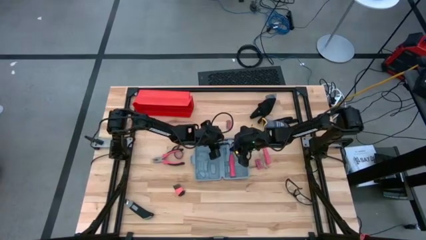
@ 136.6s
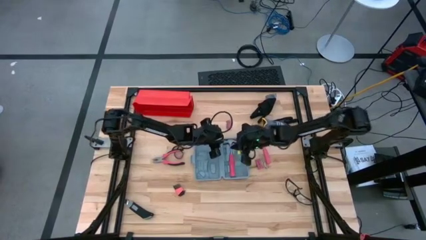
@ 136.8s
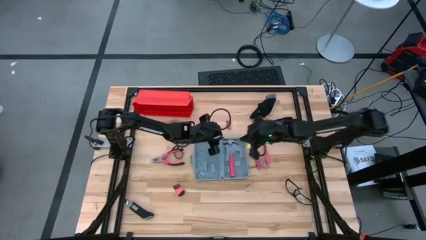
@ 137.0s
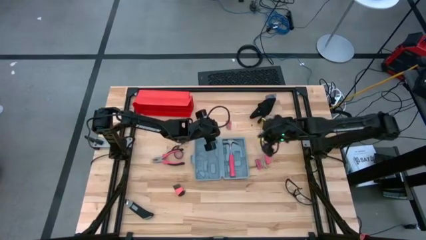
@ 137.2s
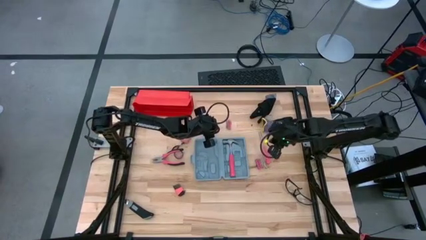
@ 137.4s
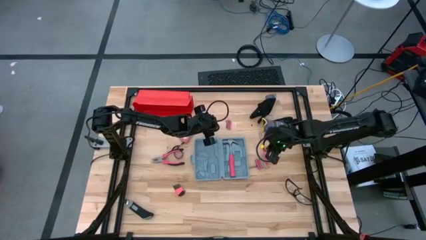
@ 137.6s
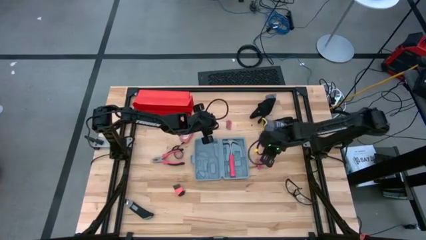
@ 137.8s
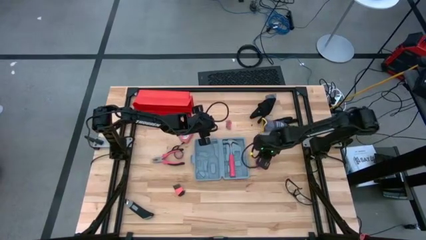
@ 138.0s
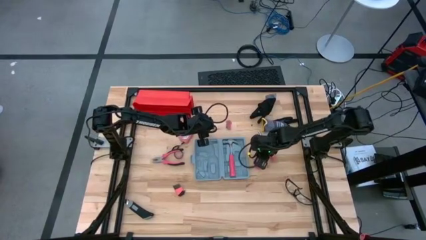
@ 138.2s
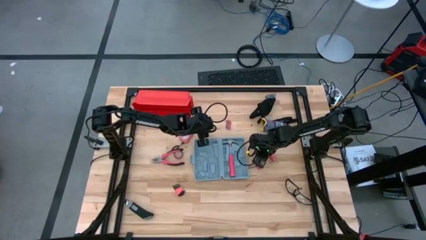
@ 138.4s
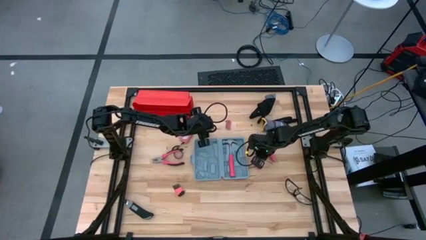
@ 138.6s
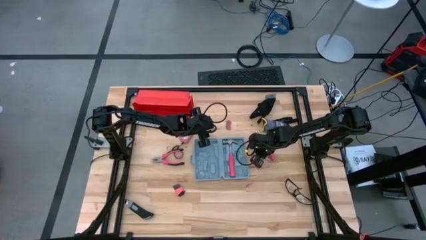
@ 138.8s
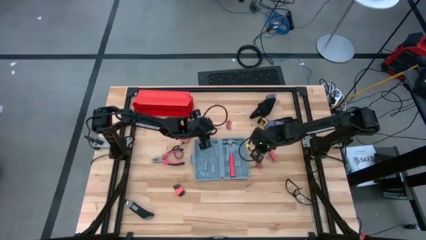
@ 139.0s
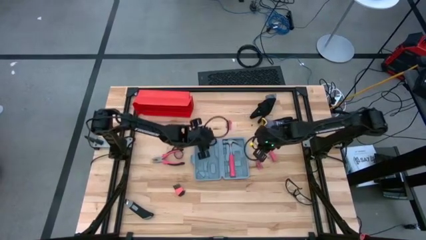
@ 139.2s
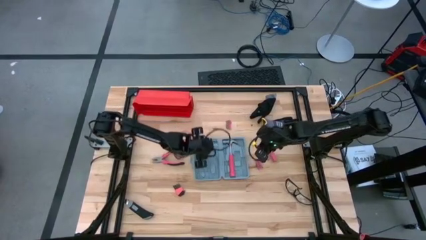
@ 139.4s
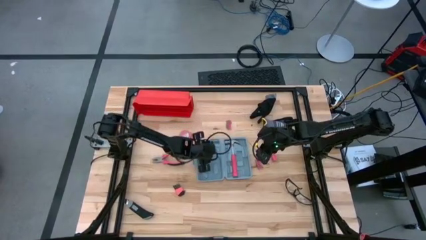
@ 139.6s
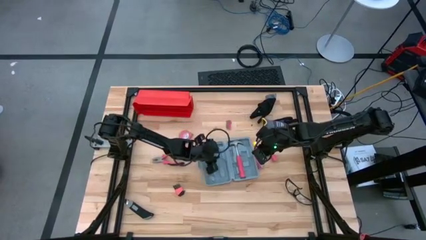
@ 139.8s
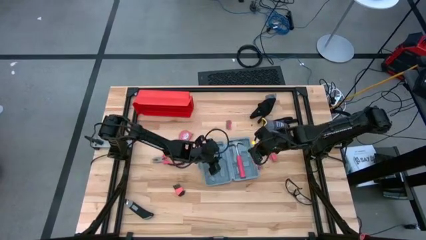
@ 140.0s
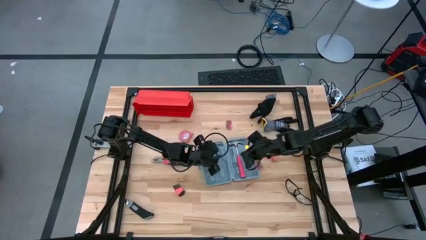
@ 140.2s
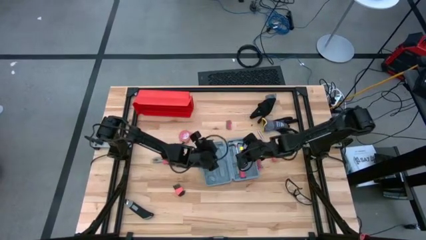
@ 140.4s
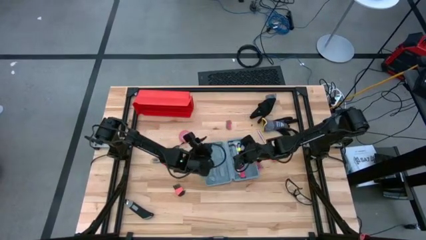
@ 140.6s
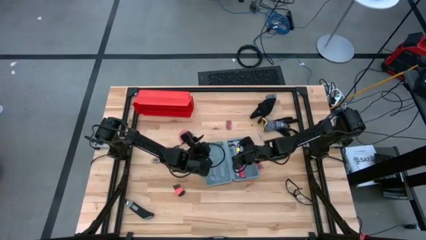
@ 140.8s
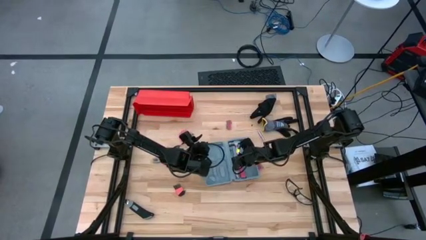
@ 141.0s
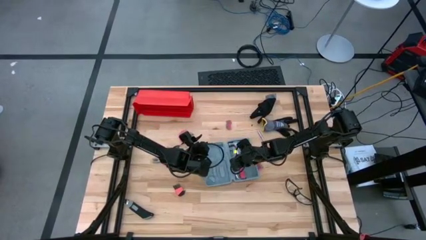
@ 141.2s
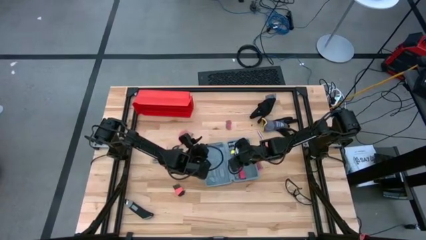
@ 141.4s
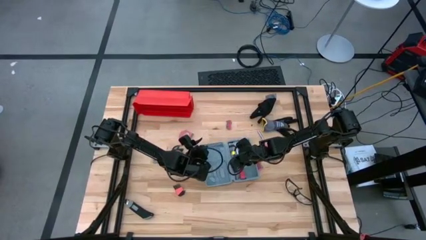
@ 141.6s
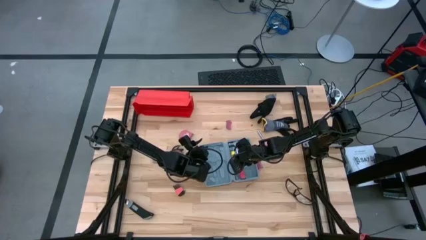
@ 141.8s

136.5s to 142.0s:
Task: prefit tool cases
Put the transparent flat screwdriver into the gray pre-fit tool case

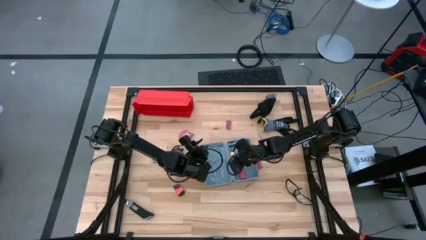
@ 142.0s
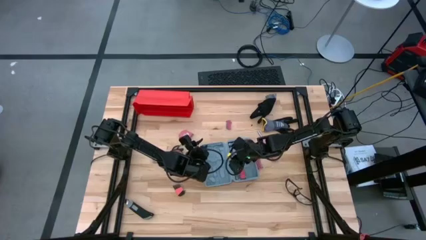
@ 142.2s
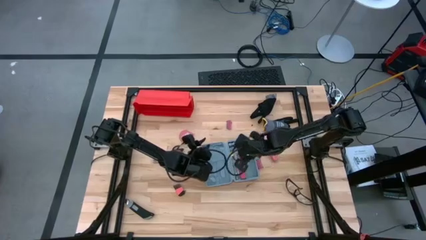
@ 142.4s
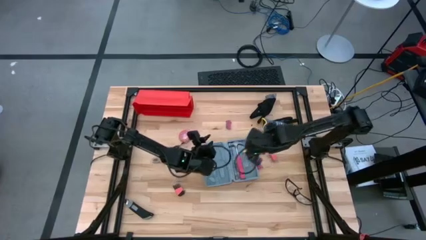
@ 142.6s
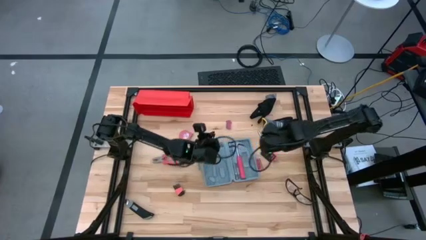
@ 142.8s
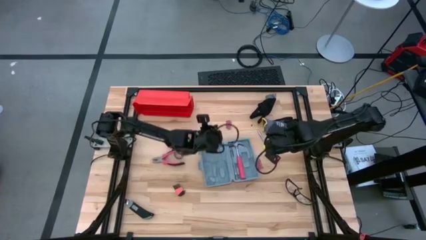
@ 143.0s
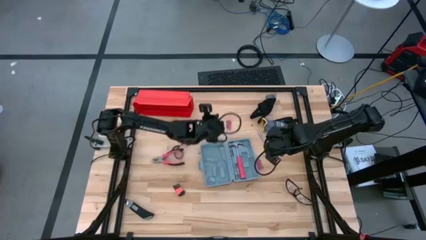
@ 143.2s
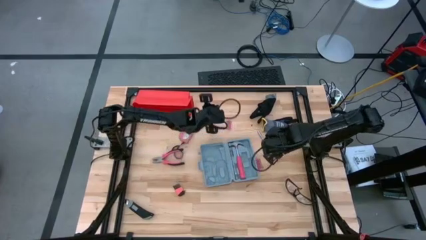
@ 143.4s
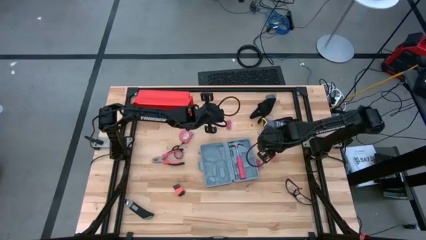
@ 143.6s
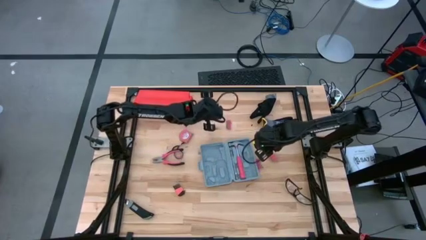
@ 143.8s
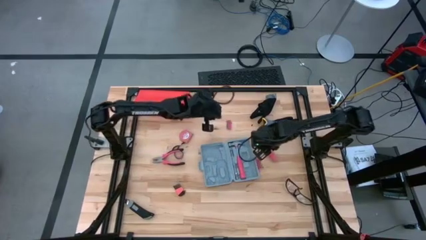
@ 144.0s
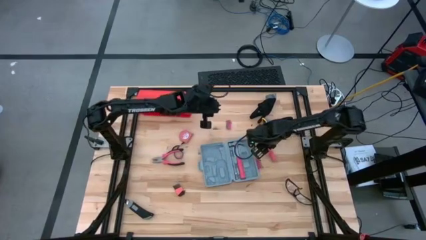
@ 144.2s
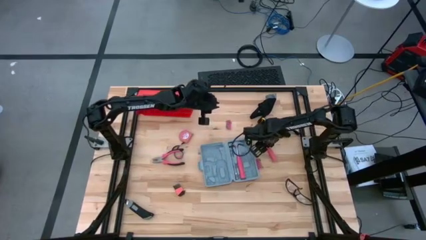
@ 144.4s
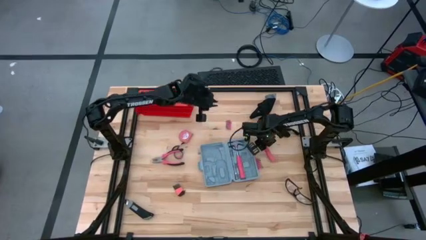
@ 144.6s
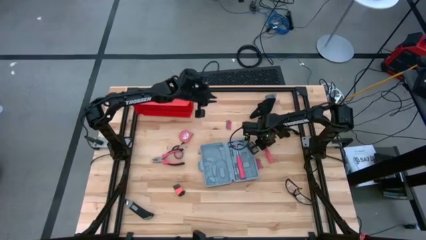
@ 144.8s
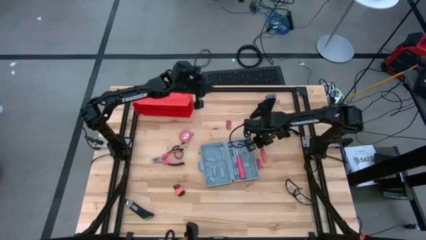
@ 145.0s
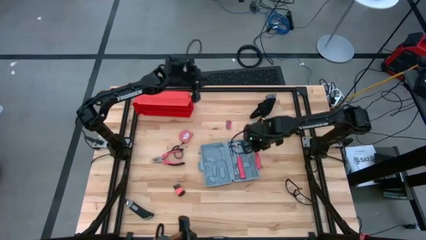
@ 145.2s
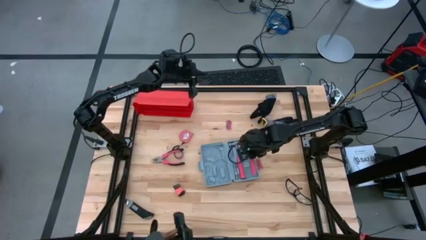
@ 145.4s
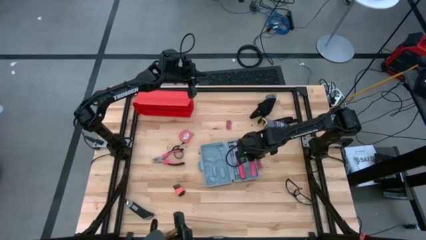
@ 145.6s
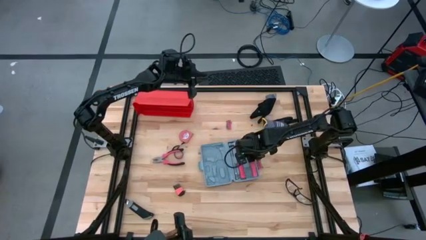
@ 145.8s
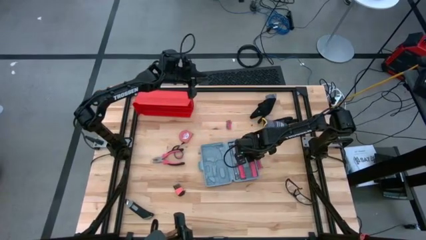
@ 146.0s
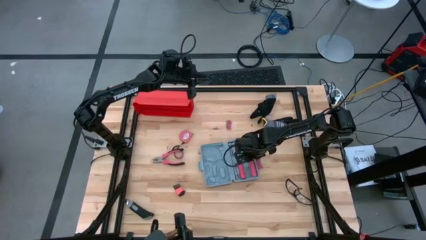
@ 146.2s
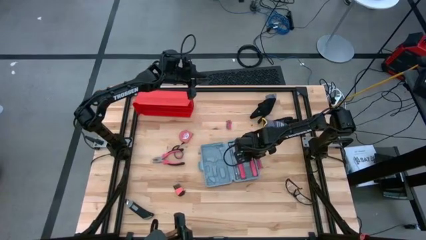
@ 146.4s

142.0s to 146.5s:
Put the orange nut driver into the gray pre-fit tool case

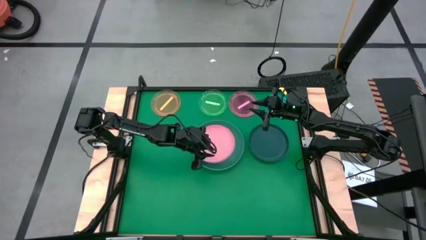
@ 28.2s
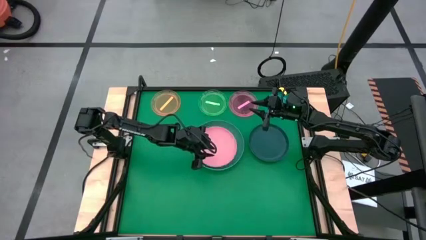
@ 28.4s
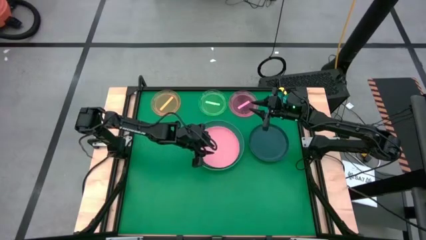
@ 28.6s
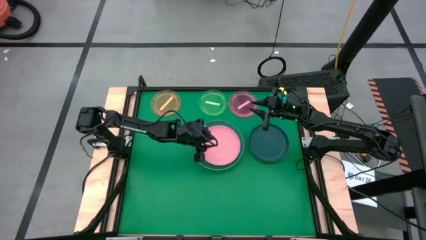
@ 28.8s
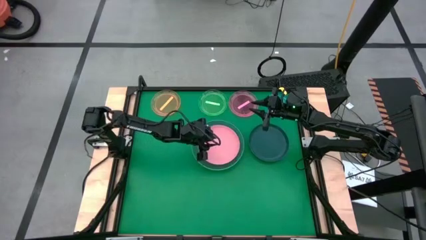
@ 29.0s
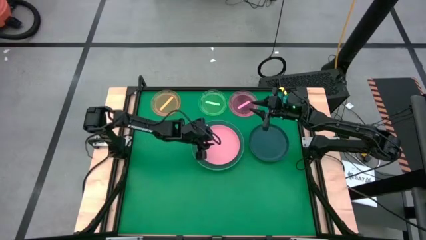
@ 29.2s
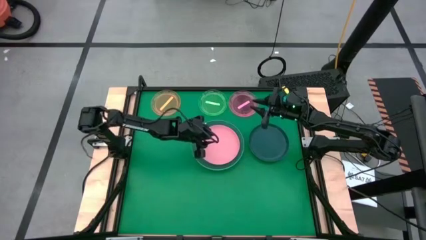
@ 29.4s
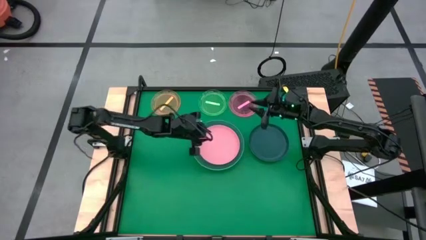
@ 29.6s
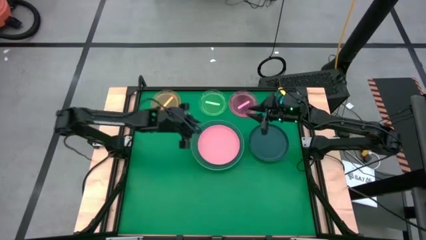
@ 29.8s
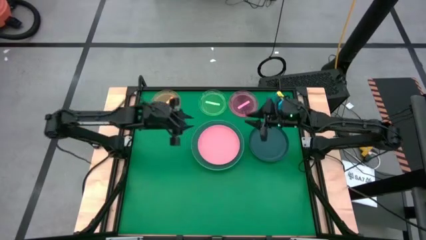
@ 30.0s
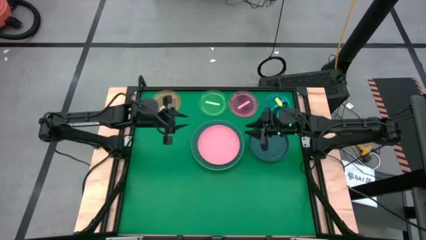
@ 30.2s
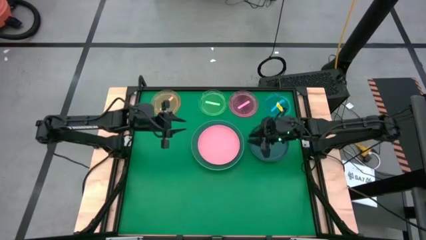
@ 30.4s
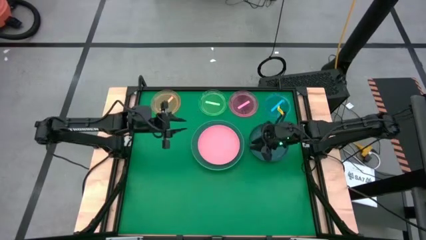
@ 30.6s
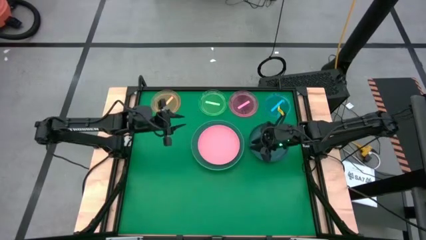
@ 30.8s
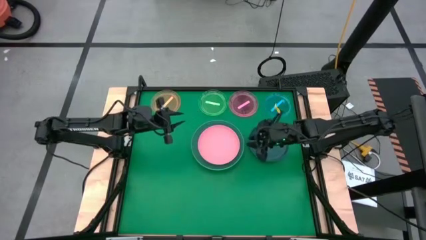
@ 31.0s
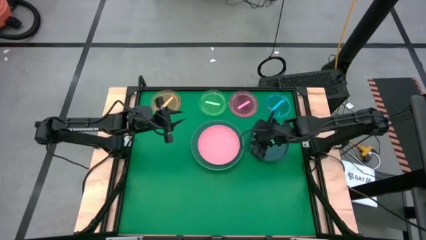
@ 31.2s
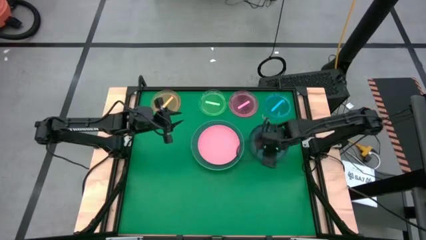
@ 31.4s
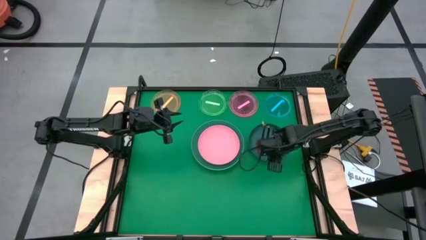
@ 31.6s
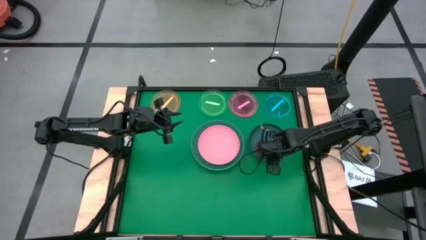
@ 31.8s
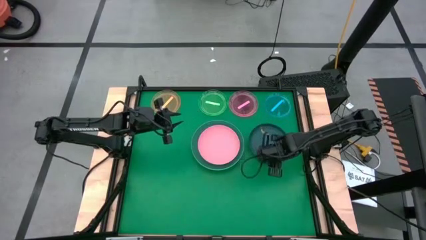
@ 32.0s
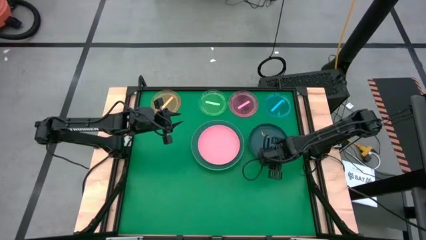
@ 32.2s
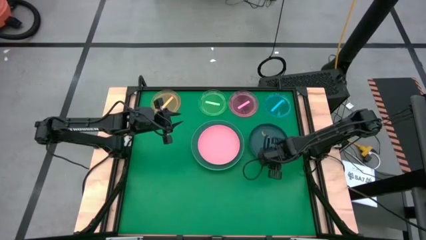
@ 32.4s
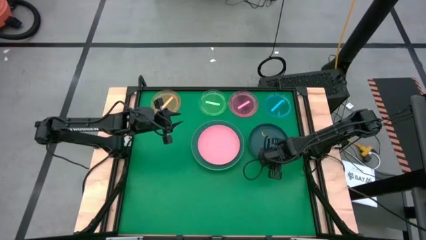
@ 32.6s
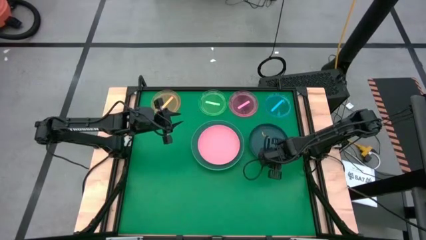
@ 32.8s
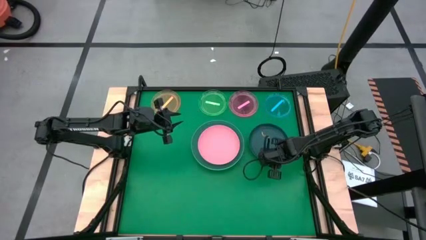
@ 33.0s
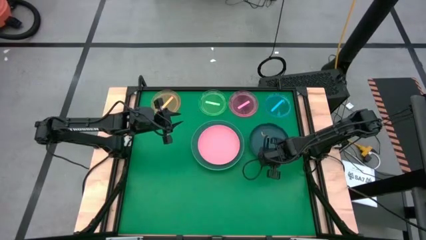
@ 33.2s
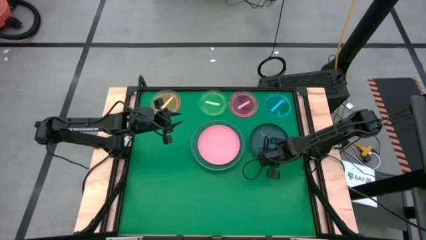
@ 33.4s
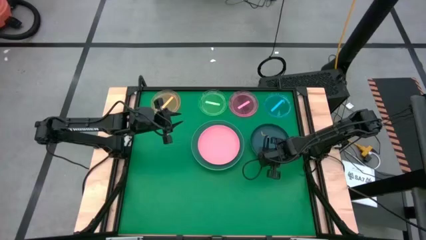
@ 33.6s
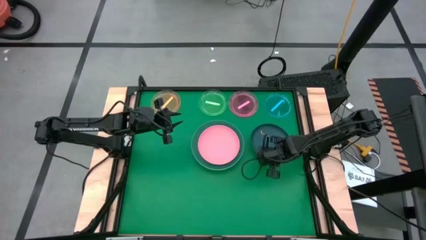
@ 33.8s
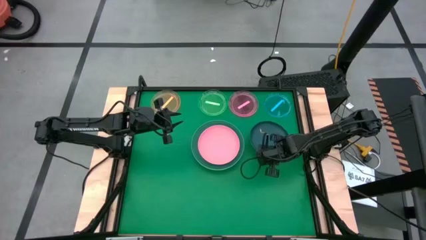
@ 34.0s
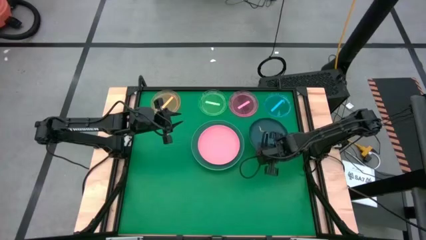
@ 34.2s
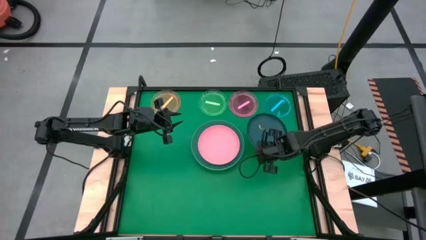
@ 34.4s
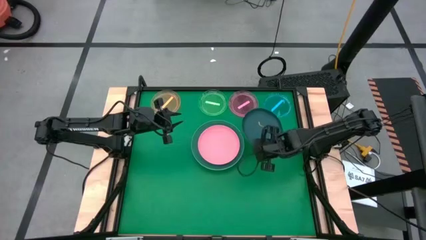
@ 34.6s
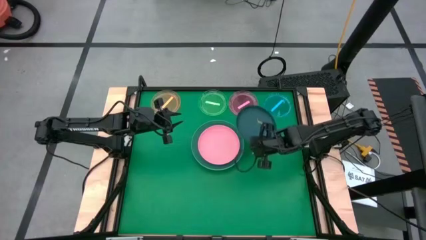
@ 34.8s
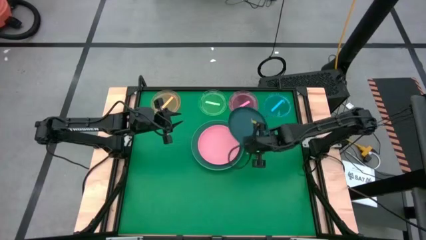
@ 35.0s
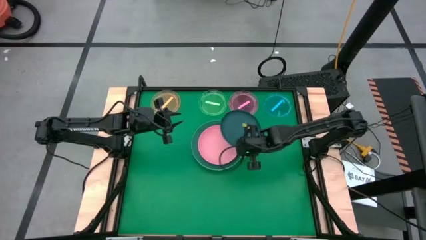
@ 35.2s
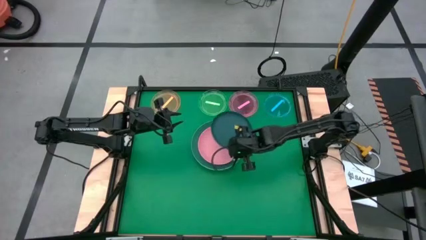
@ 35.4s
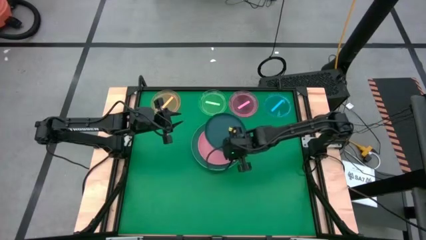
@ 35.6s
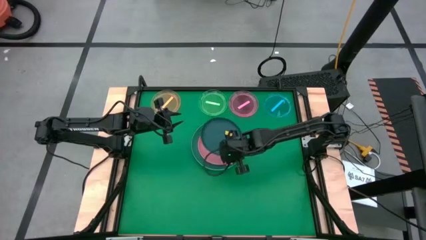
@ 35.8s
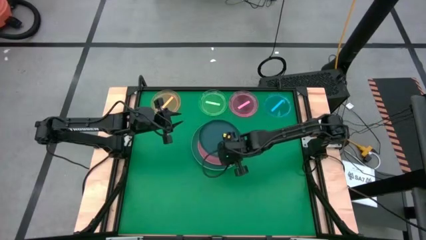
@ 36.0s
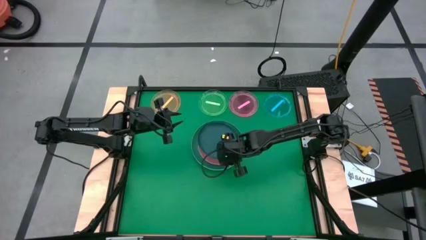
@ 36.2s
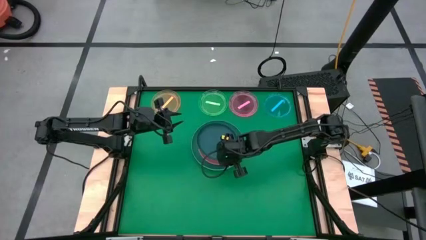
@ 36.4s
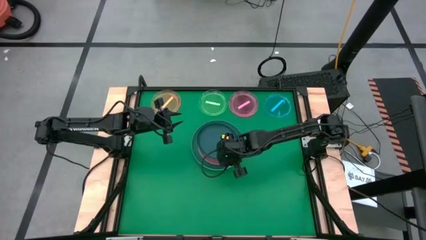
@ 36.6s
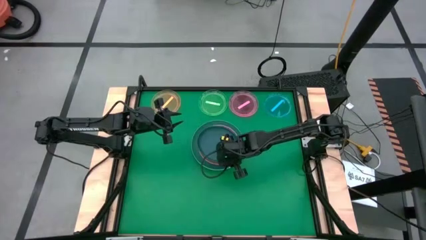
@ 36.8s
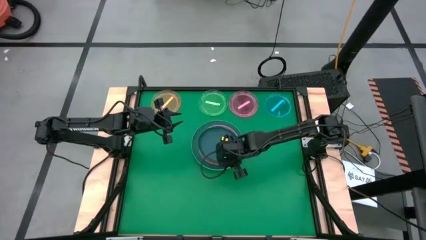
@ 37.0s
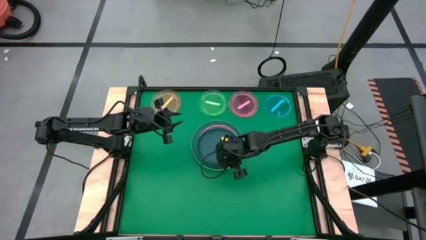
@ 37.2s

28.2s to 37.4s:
Task: Stack plastic plates
Stack the dark blue plate on top of the pink plate
